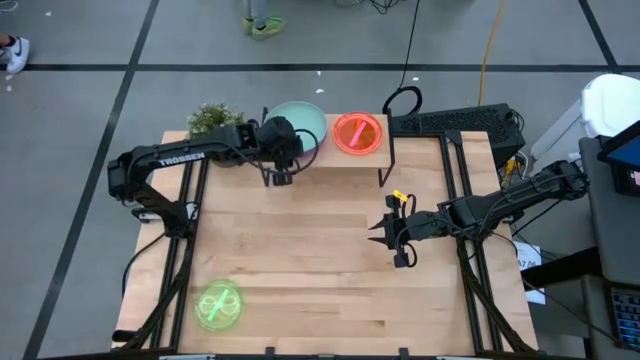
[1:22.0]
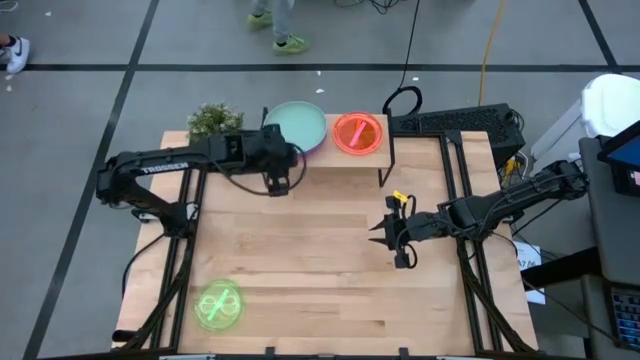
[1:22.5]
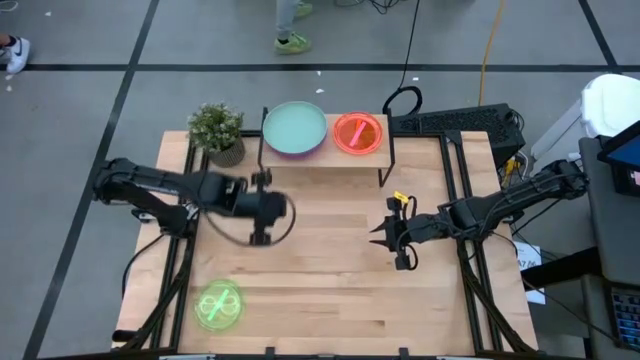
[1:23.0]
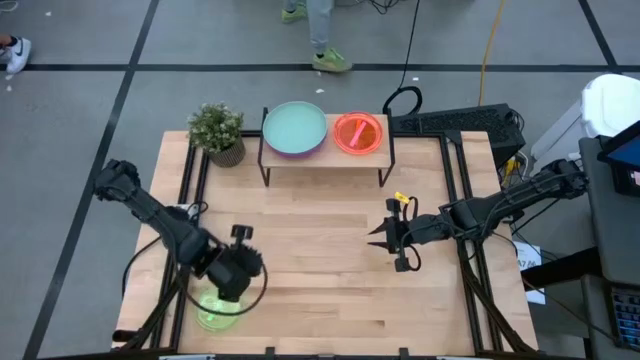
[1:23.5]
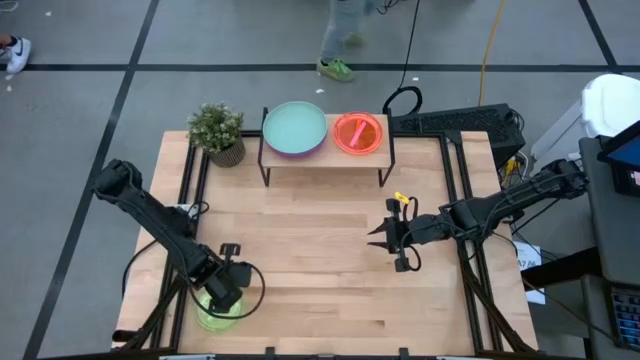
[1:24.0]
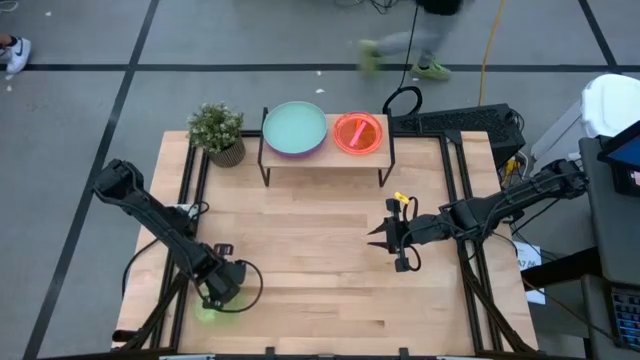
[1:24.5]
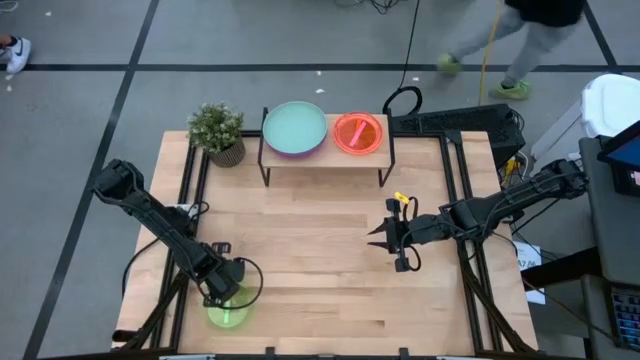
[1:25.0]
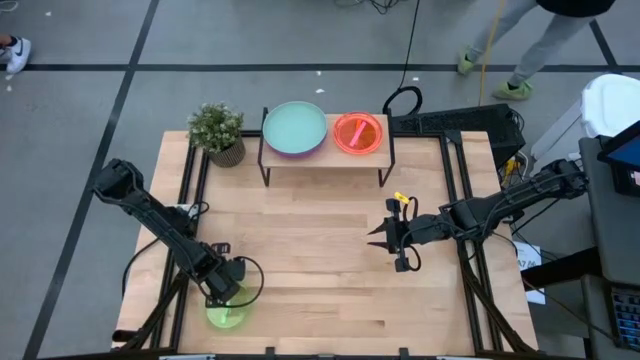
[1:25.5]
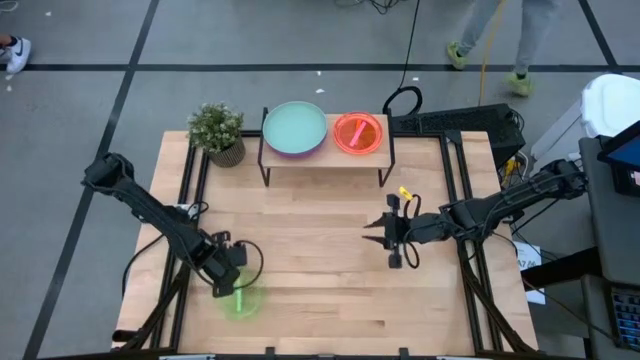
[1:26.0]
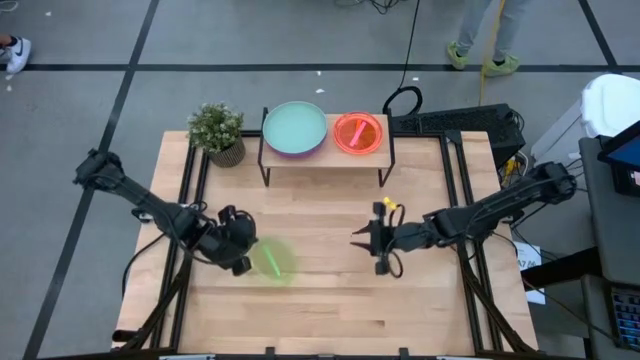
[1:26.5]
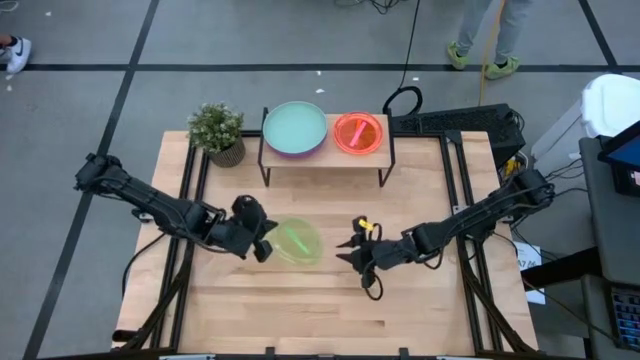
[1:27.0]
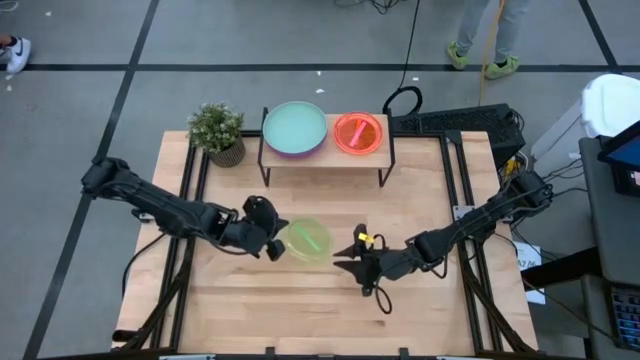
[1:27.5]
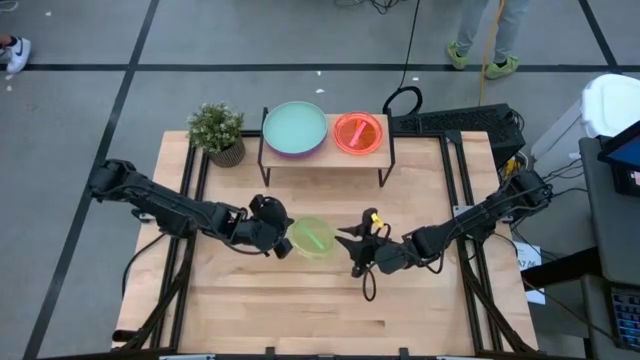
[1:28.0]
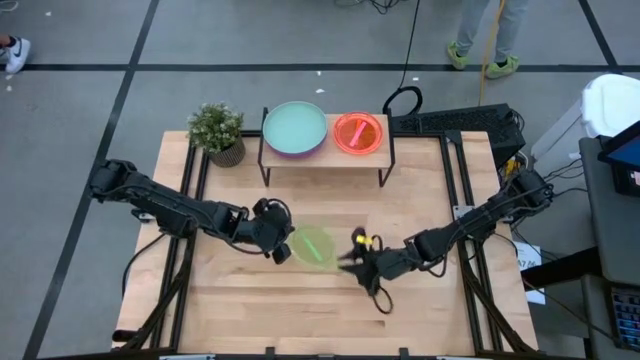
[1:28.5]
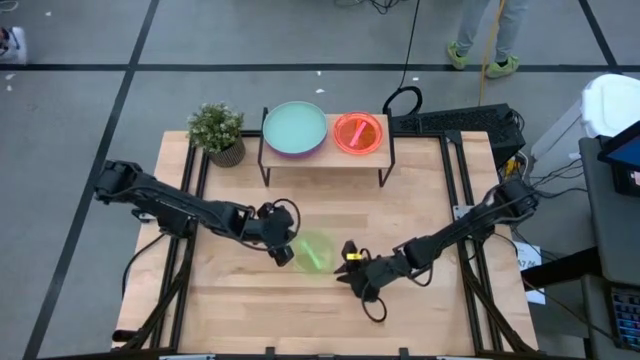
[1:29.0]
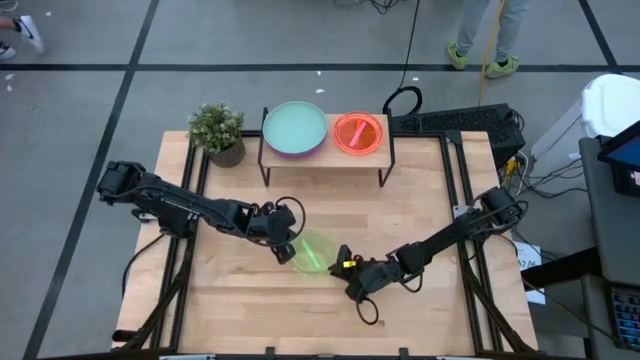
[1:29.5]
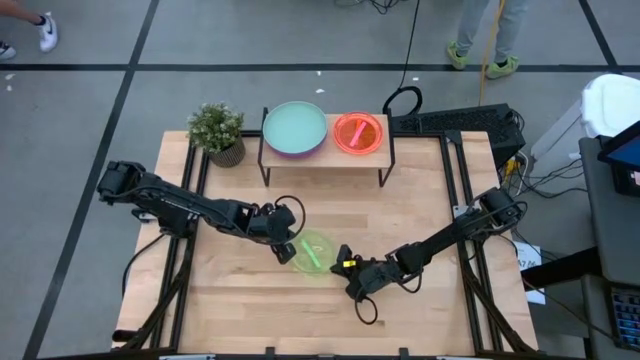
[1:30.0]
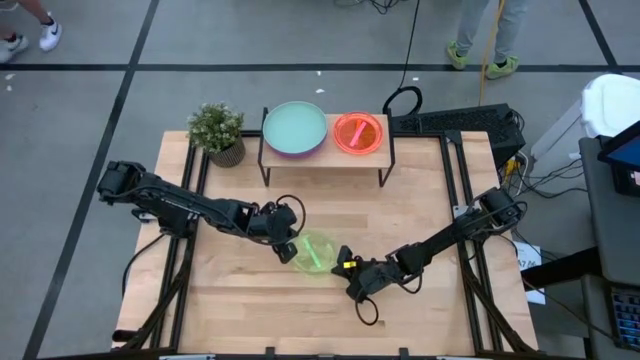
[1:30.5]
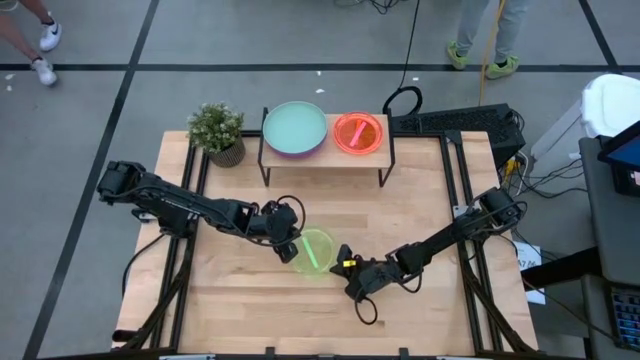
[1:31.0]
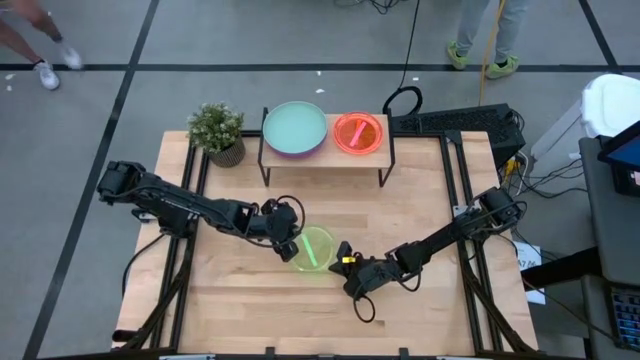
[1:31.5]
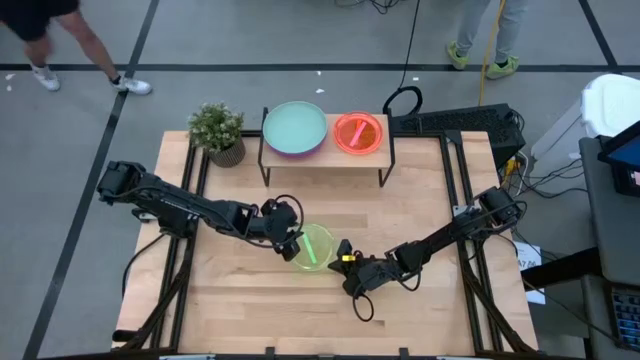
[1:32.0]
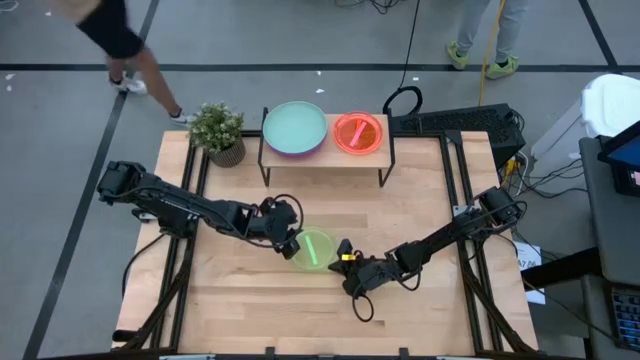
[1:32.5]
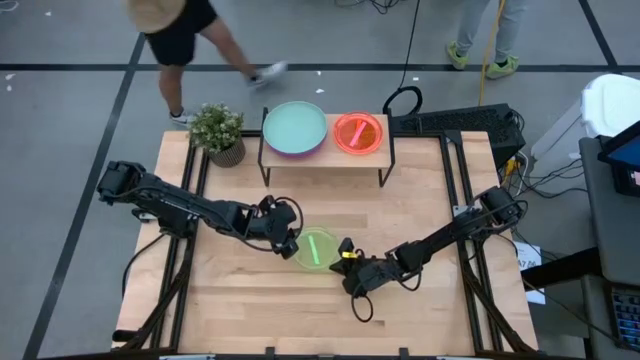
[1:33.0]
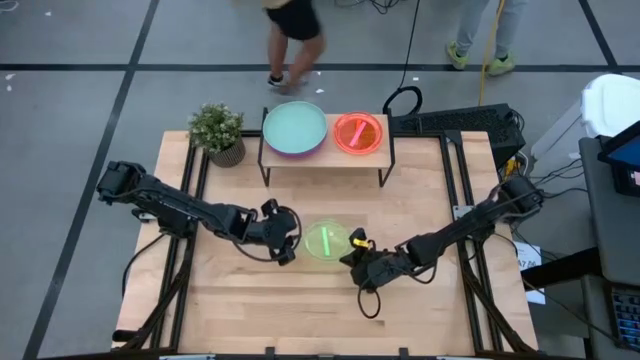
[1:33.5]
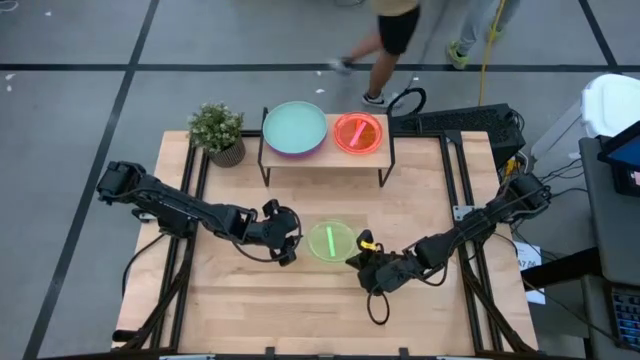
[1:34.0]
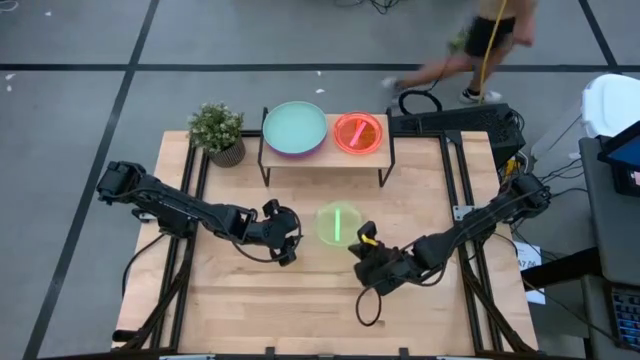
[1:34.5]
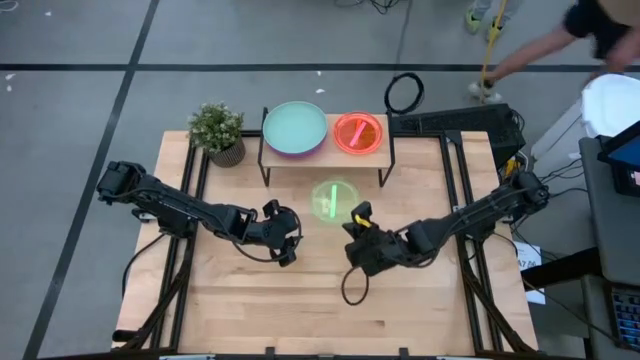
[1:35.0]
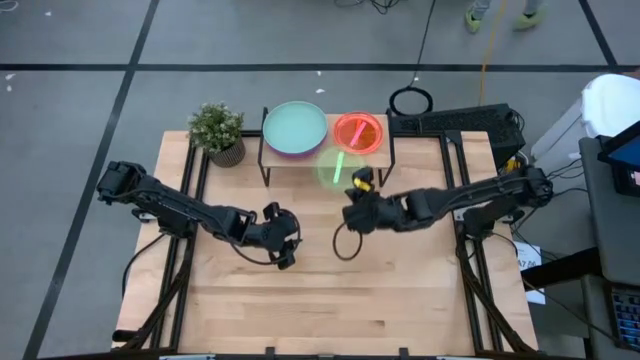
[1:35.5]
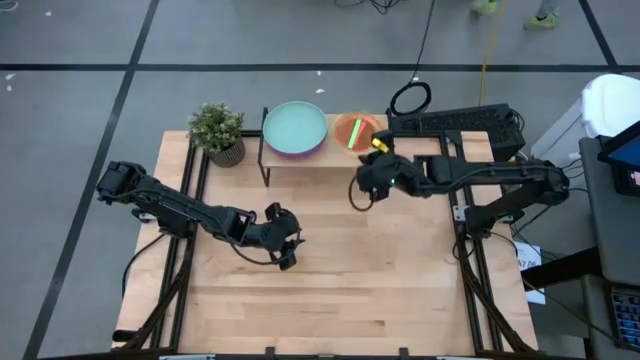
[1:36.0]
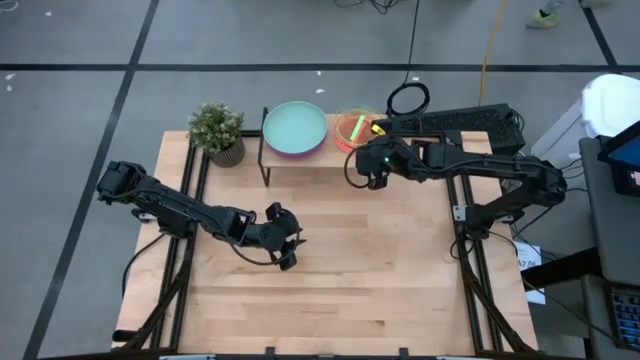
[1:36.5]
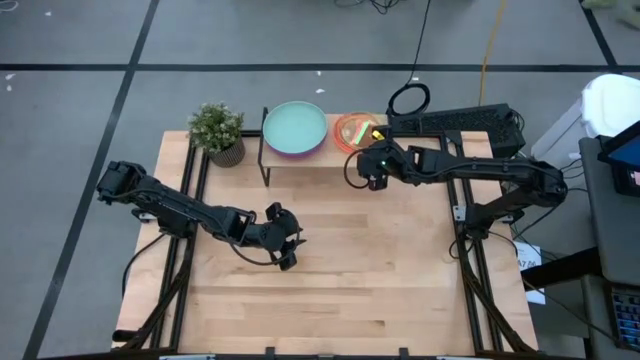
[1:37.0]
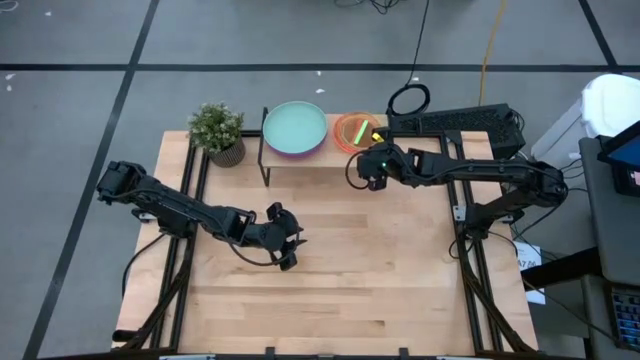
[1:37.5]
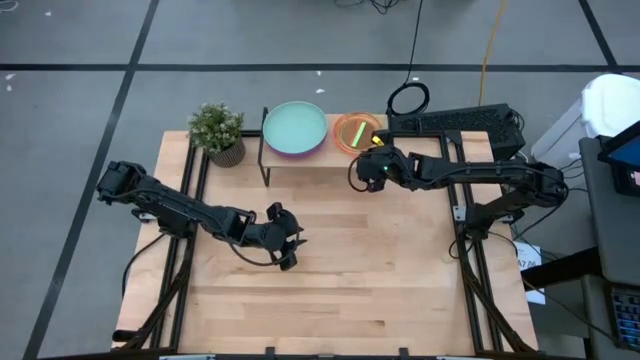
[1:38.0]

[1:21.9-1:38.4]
Task: Place and stack plates onto a shelf
Stack the transparent green plate on top of the transparent pink plate on the shelf

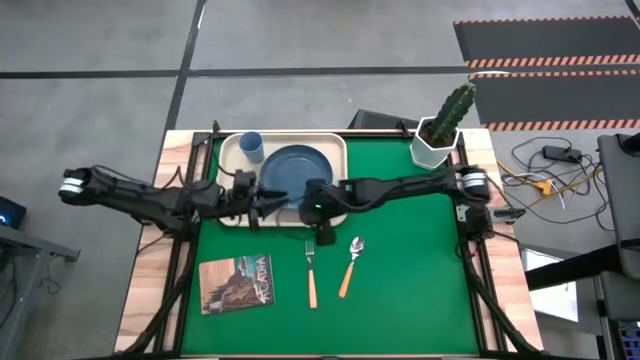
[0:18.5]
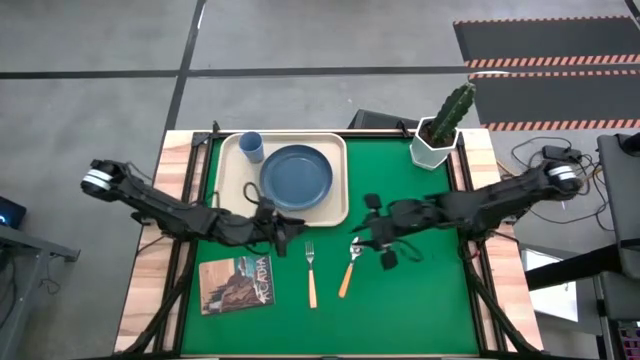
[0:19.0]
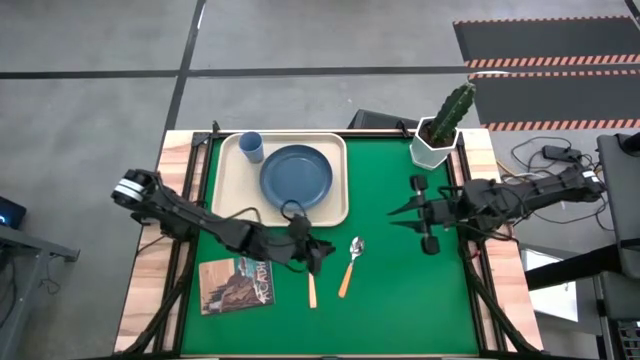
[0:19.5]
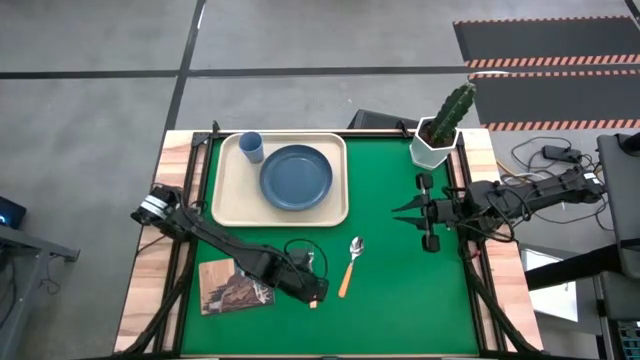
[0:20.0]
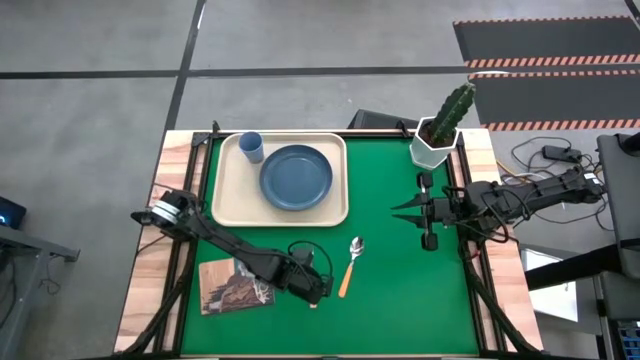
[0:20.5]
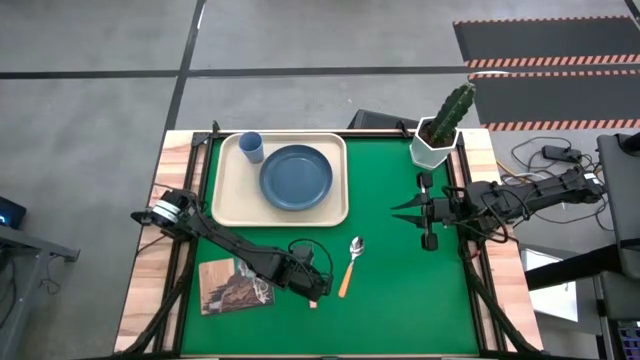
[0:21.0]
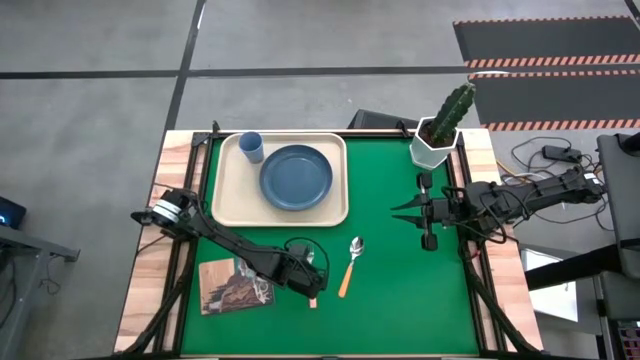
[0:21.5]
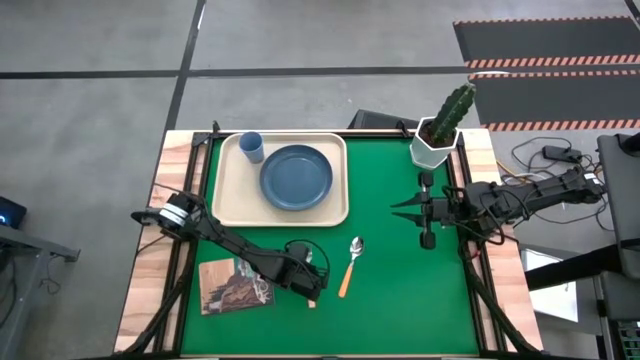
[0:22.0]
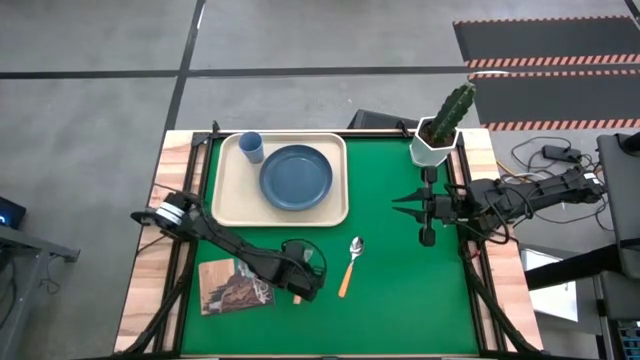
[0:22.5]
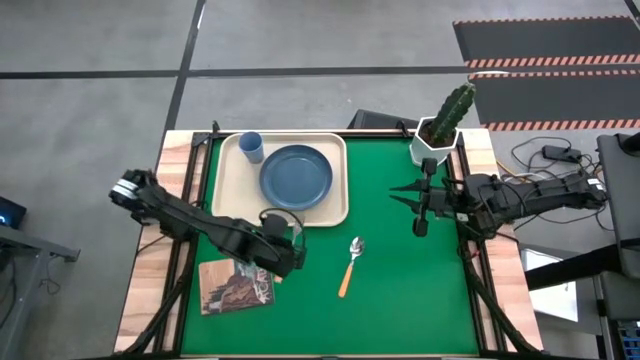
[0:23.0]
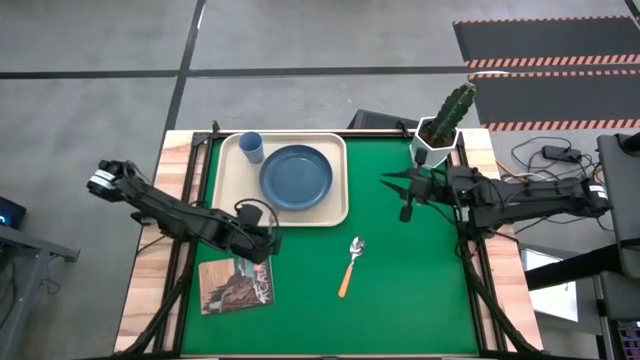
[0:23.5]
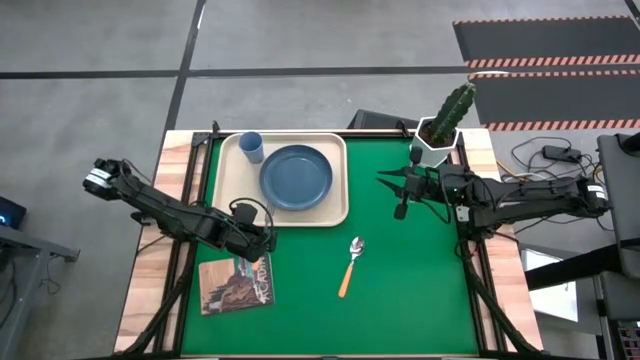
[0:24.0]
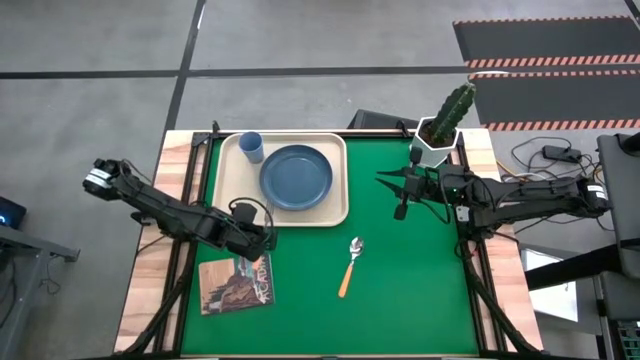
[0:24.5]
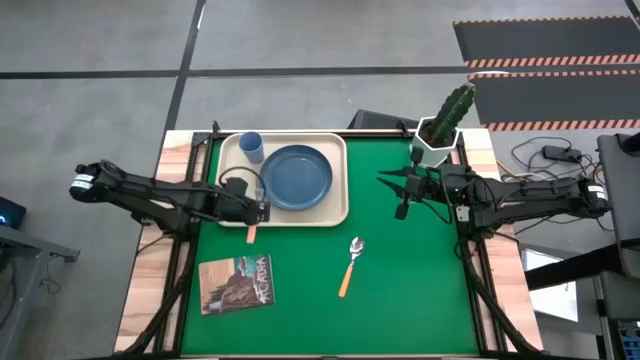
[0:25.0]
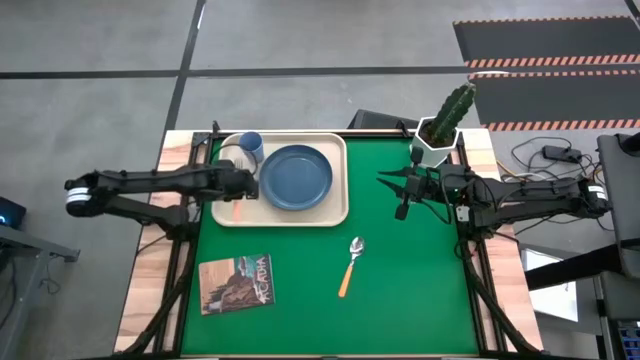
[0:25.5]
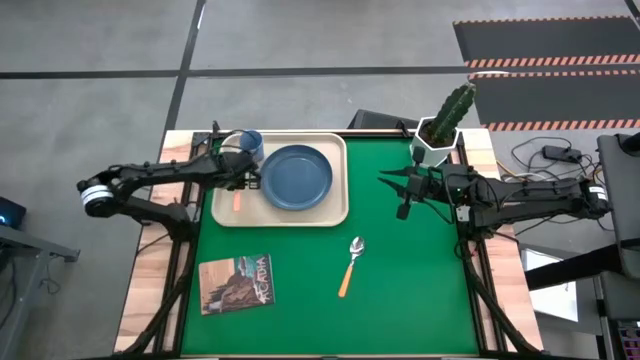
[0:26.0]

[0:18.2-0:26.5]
Task: Pick and place plate/cup/fork/spoon on tray
Put the orange fork on the white tray to the left of the blue plate
